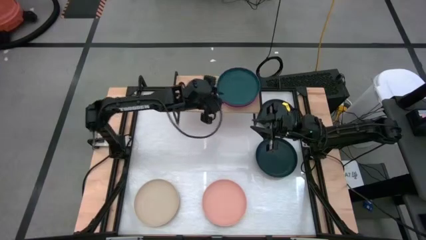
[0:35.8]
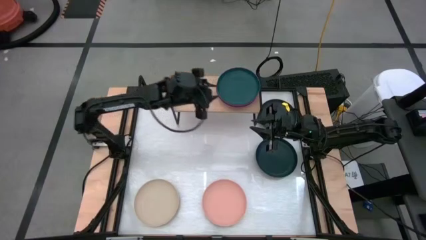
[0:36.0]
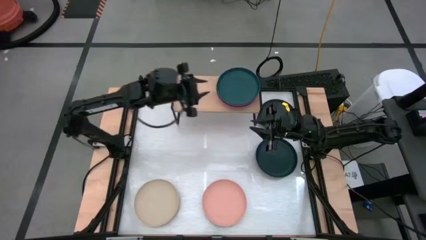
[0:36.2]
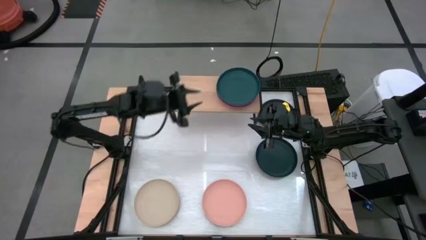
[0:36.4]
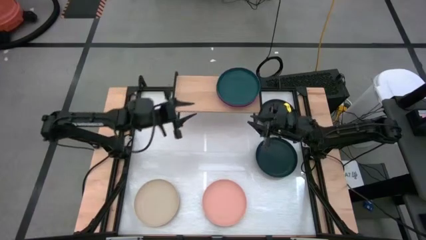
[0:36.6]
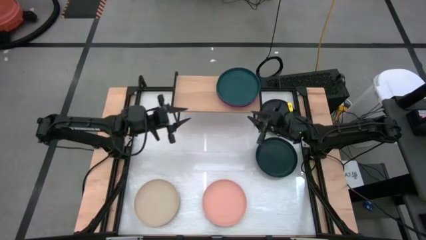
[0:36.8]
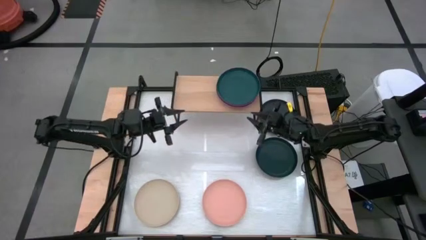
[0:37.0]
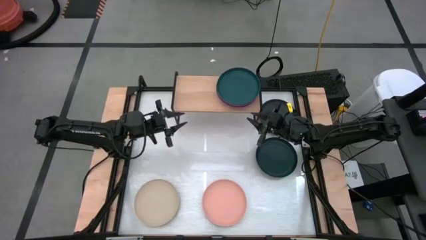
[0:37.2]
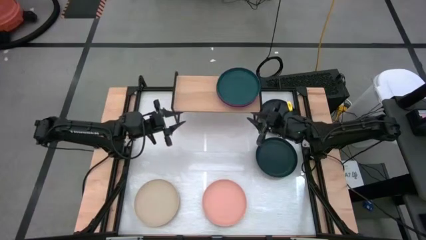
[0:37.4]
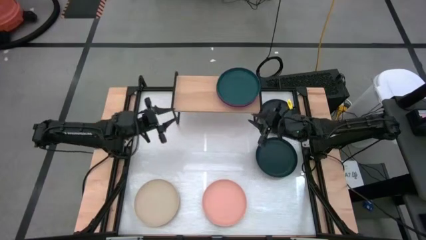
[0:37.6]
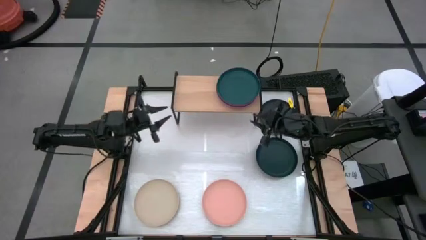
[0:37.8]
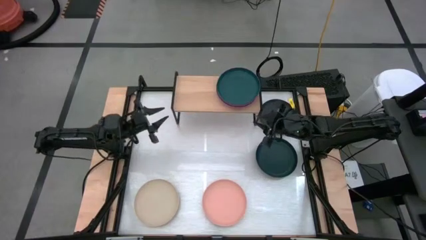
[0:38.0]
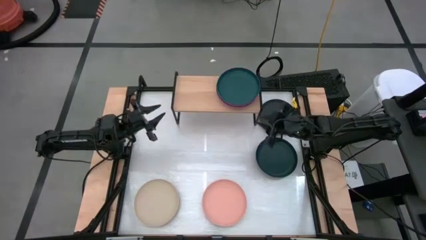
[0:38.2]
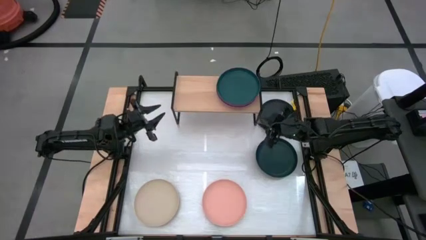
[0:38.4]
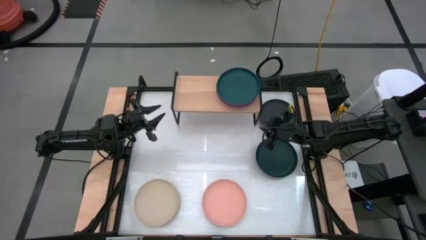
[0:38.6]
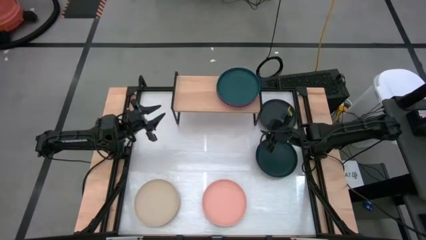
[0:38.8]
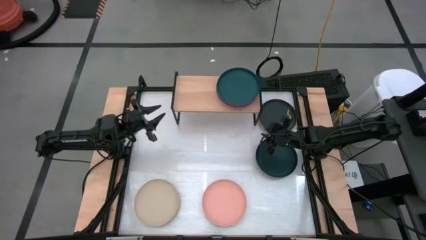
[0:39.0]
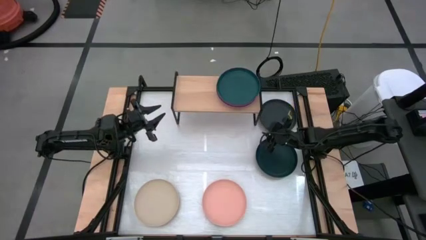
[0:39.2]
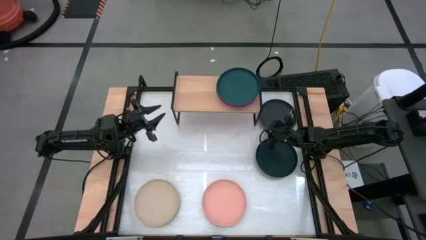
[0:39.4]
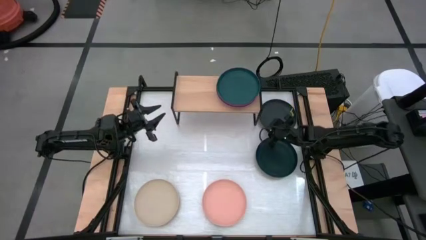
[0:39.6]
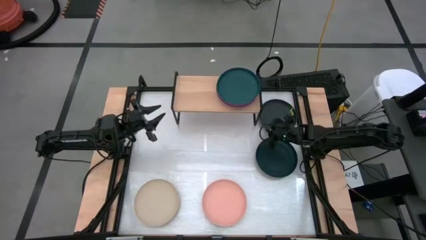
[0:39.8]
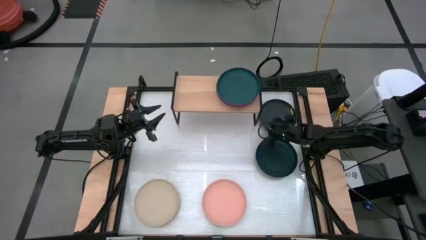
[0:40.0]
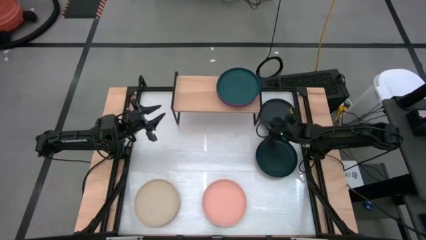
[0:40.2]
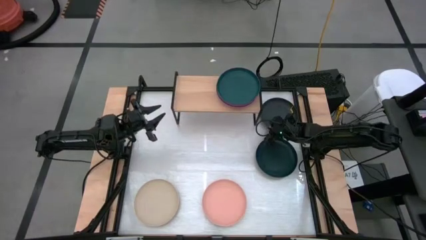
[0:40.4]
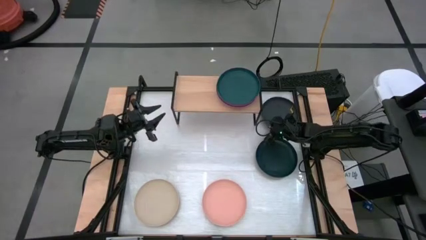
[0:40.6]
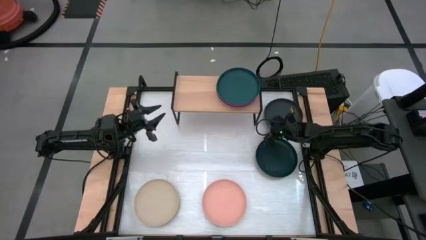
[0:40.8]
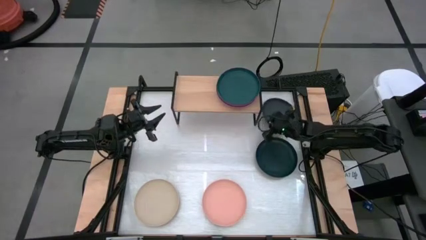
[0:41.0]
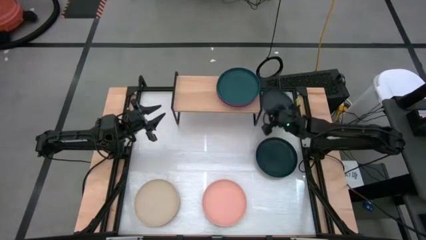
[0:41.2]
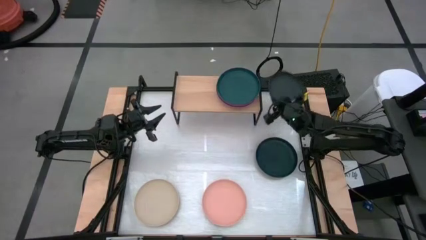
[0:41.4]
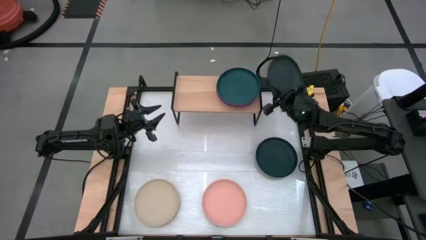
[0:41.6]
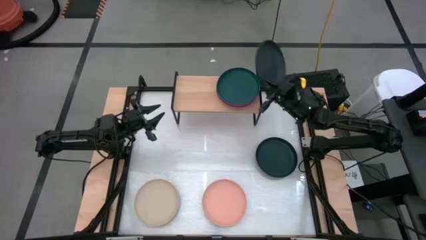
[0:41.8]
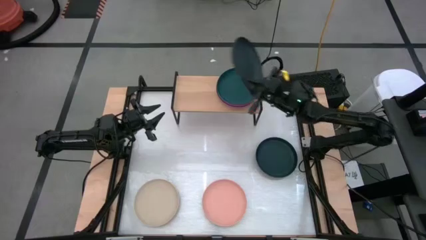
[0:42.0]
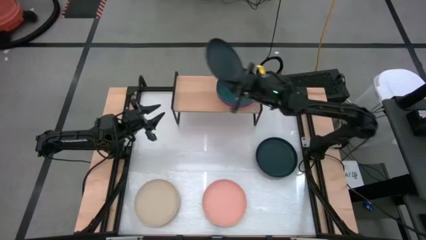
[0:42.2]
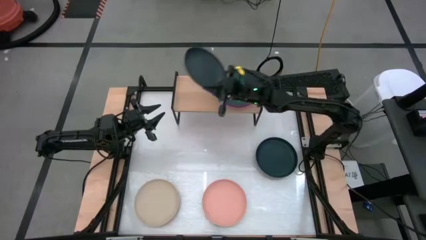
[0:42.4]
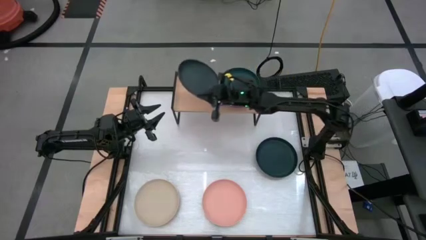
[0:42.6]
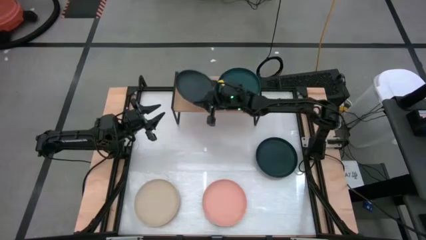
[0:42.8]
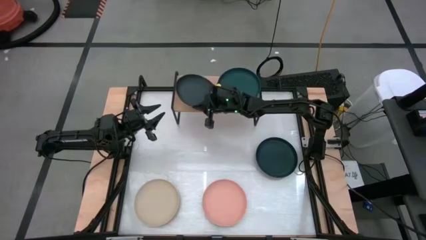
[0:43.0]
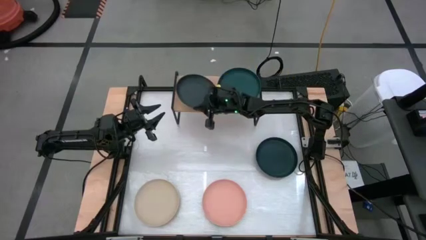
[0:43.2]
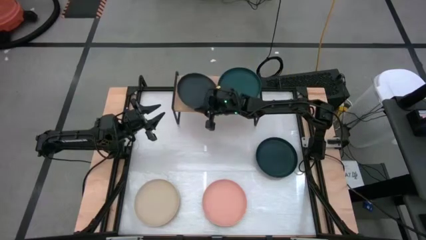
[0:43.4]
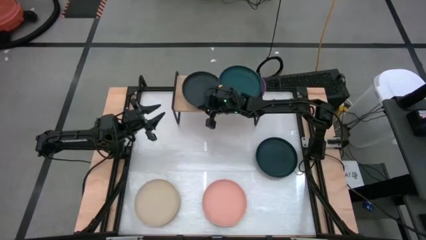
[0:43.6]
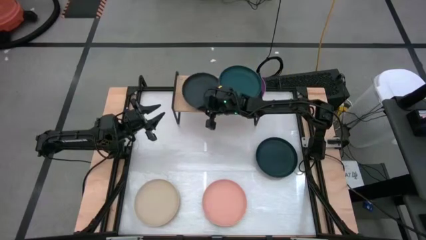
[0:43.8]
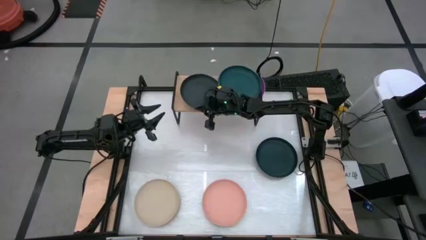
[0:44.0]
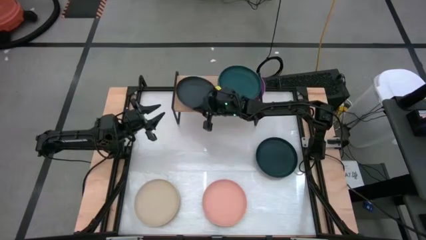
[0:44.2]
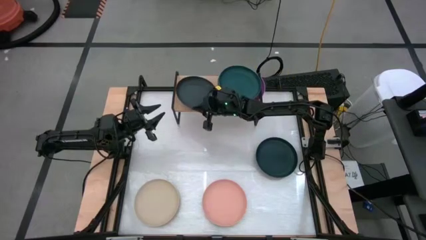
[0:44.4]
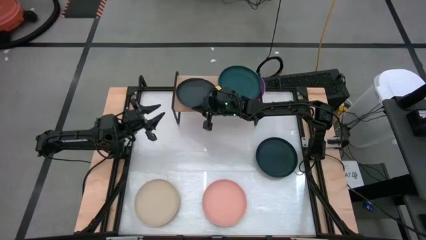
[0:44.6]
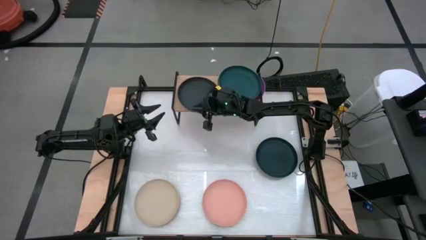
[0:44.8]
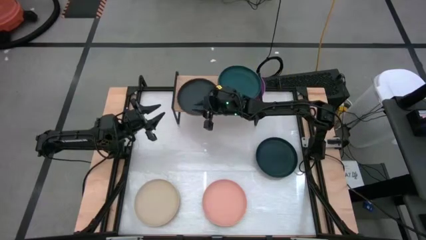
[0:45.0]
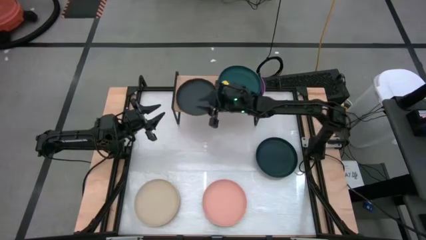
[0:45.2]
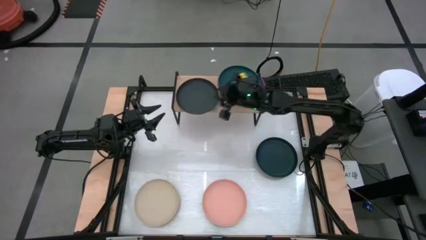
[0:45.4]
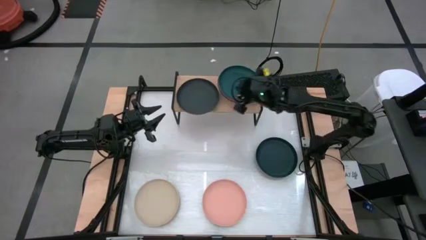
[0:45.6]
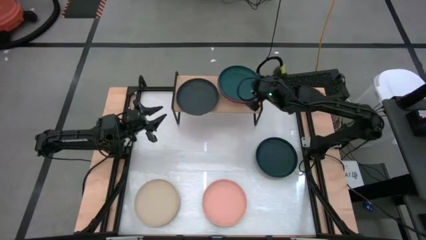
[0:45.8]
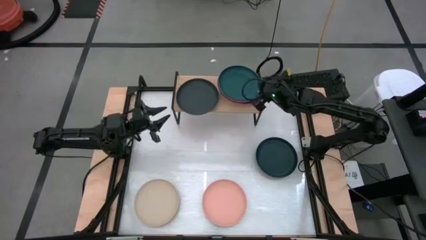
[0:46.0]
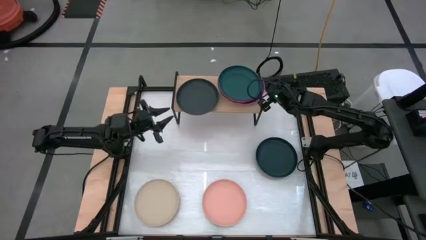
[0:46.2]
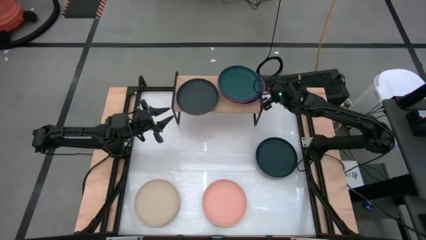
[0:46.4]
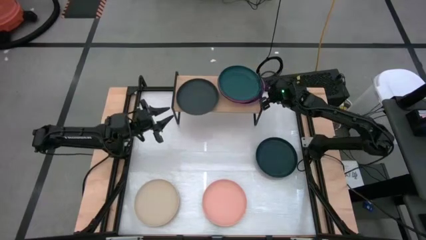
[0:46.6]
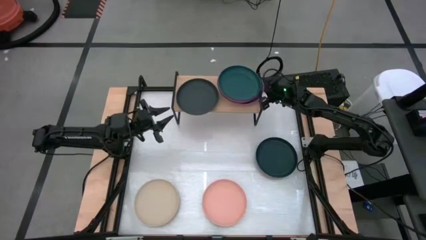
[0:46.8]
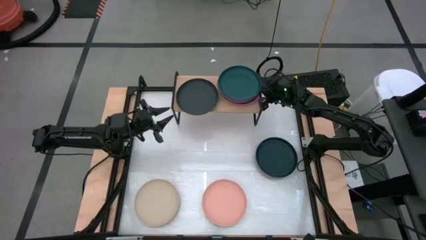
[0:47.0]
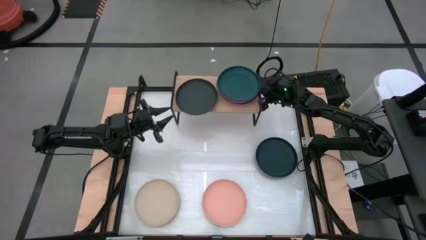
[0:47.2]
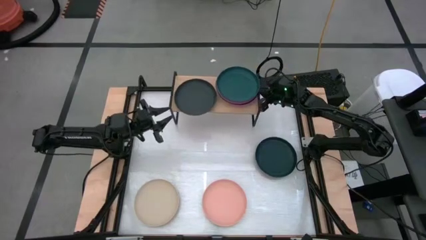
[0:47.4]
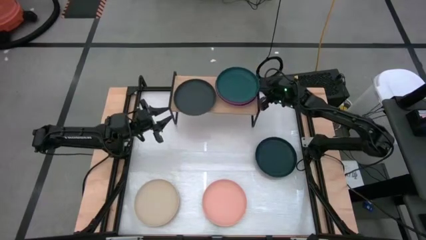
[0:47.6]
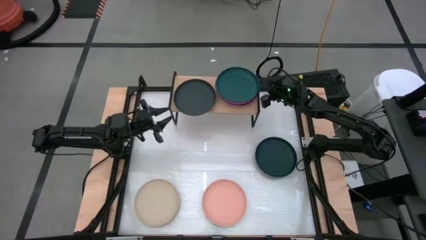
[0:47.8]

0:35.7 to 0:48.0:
Task: Place and stack plates onto a shelf
Put the black plate on the shelf

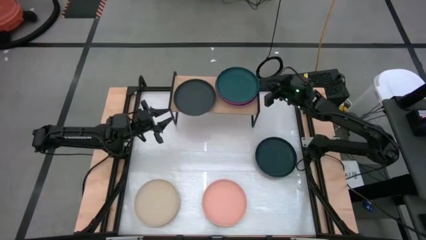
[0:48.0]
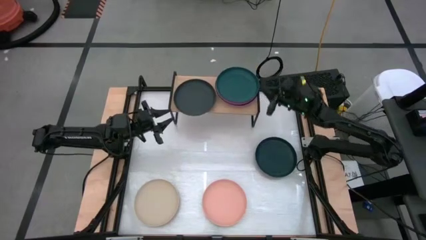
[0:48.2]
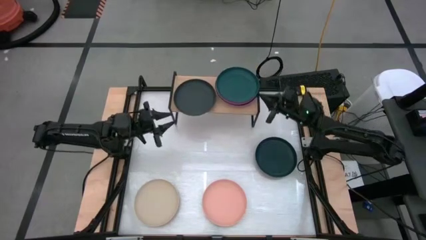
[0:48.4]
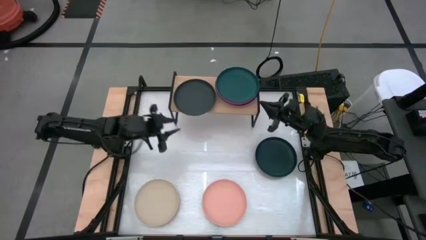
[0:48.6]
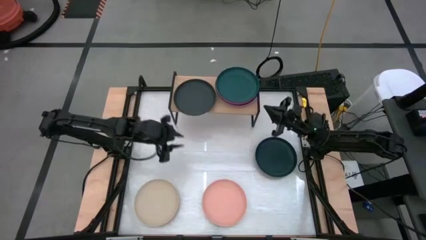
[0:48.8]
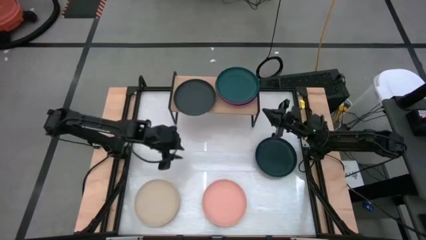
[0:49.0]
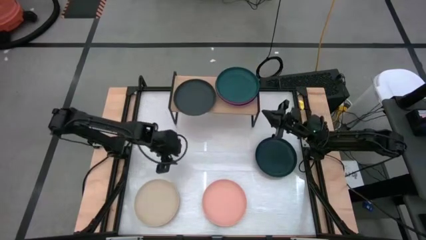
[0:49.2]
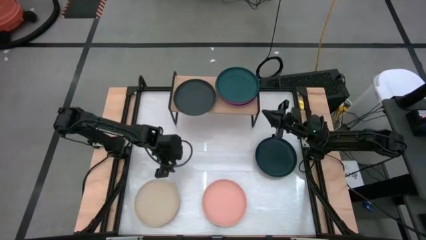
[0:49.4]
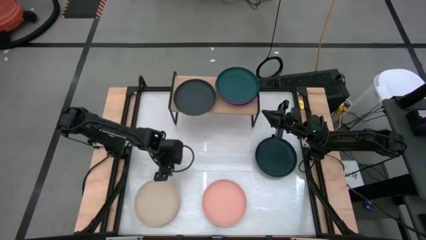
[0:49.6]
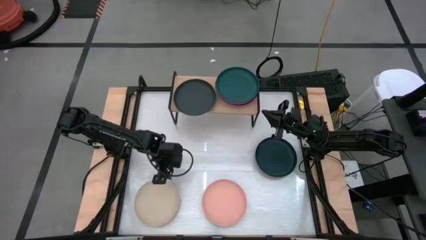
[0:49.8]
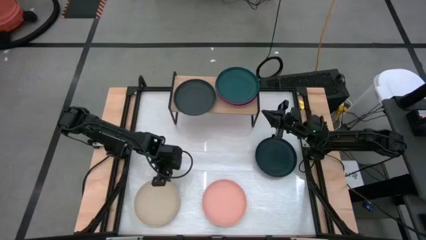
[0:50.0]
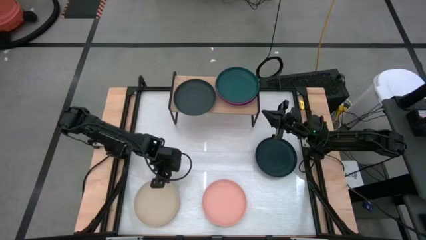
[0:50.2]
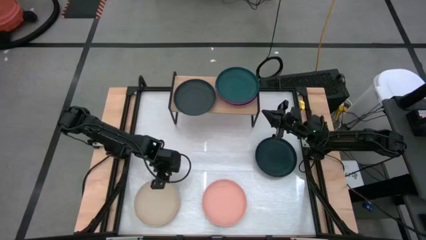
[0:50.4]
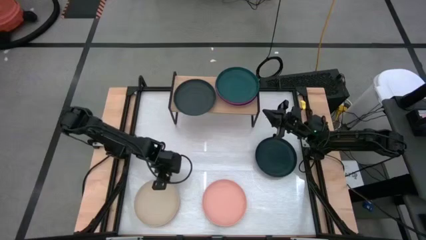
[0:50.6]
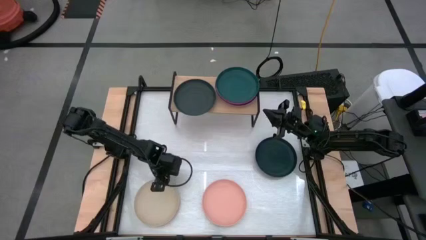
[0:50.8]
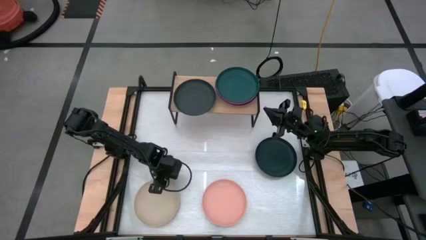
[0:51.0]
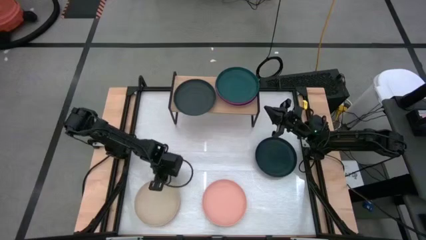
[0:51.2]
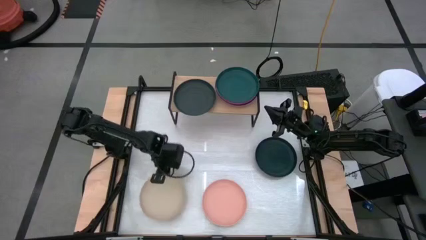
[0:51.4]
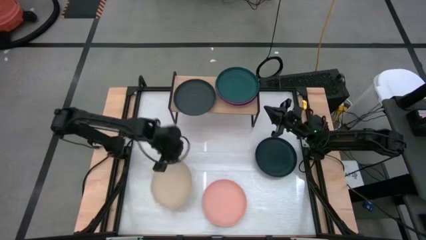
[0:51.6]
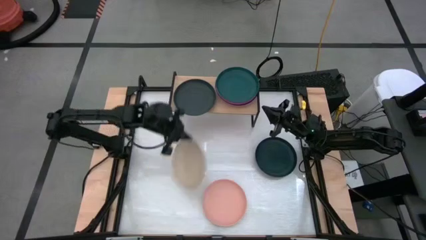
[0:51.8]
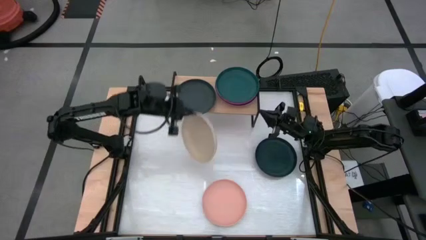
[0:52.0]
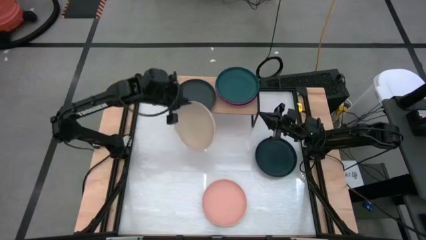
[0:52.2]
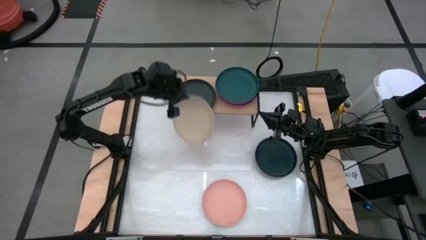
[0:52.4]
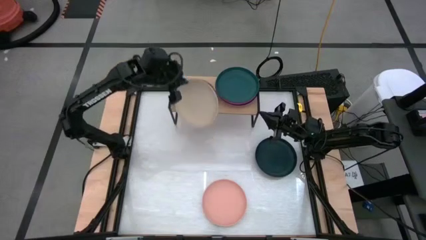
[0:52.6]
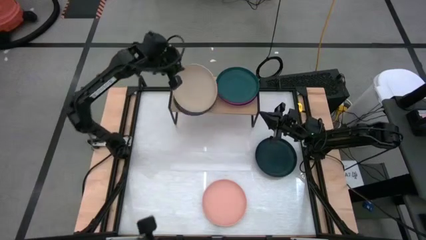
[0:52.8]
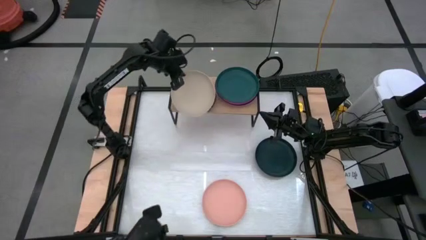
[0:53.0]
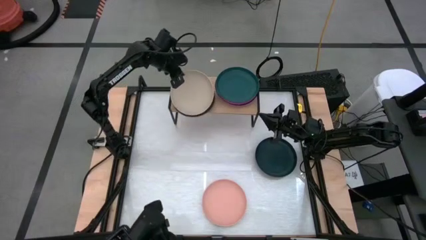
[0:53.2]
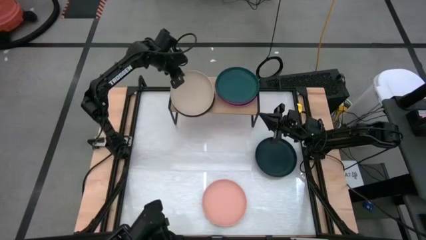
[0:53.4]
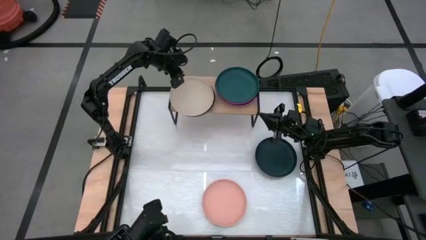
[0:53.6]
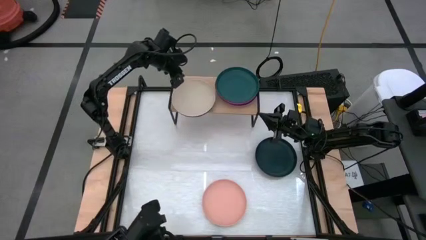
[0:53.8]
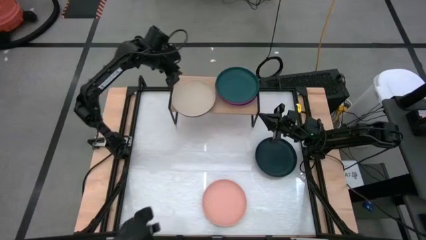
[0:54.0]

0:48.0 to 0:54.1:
Stack the light brown plate on top of the black plate on the shelf
